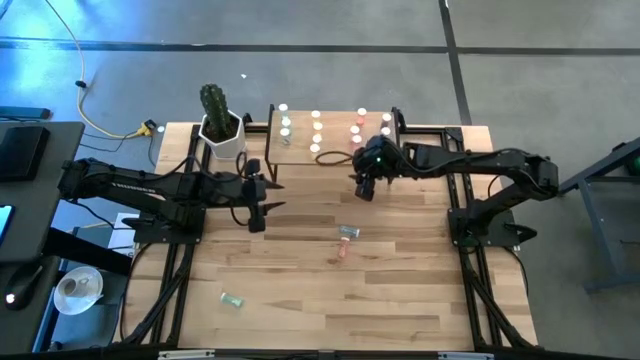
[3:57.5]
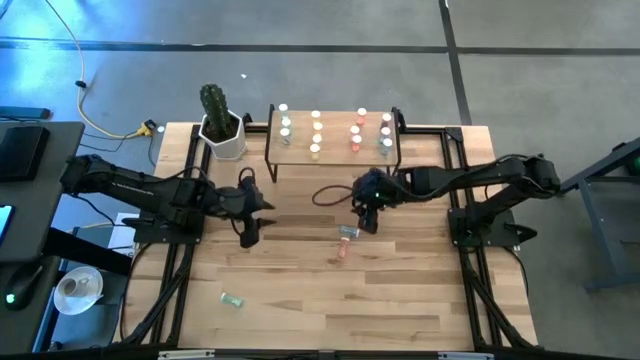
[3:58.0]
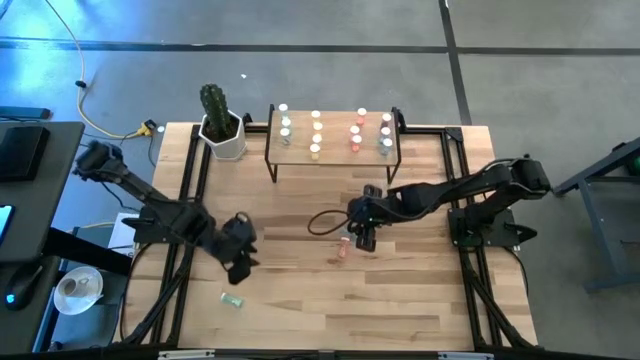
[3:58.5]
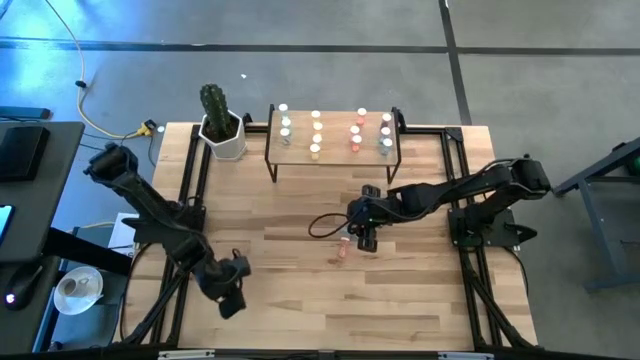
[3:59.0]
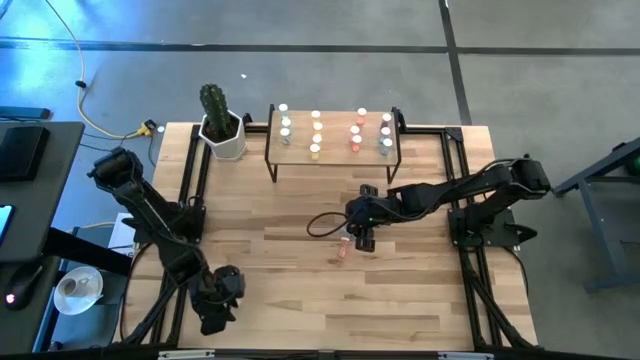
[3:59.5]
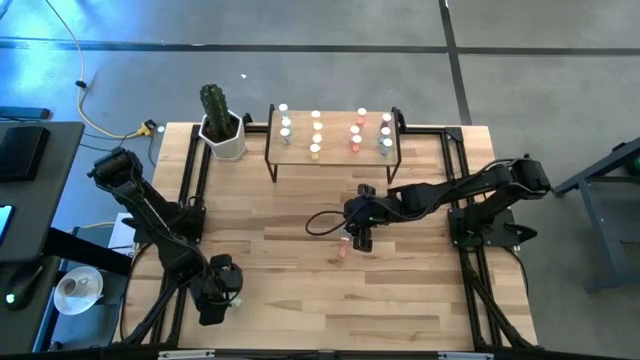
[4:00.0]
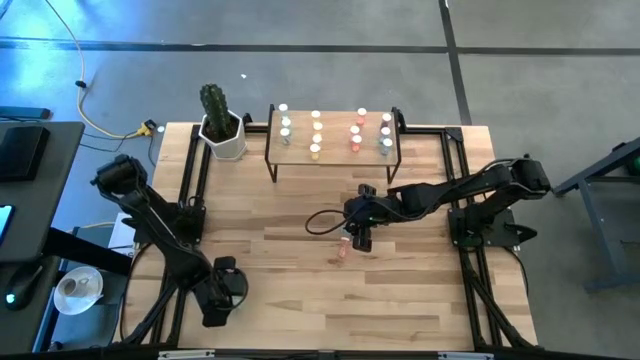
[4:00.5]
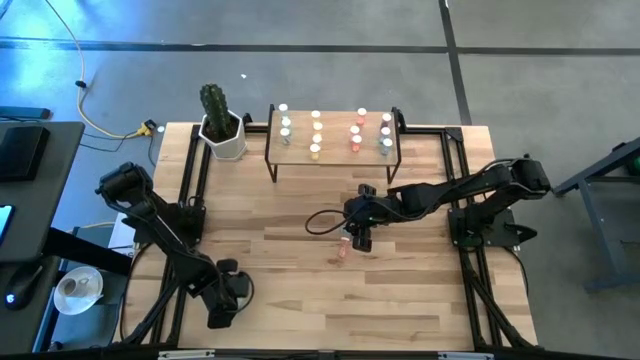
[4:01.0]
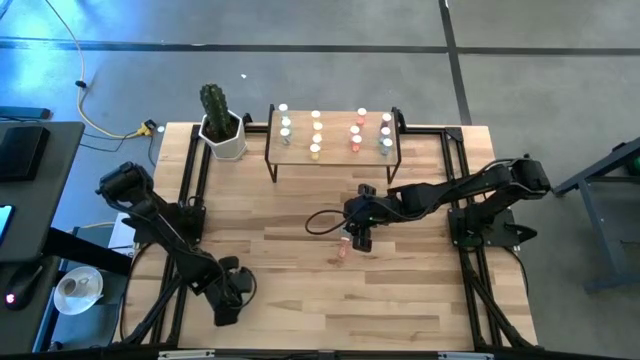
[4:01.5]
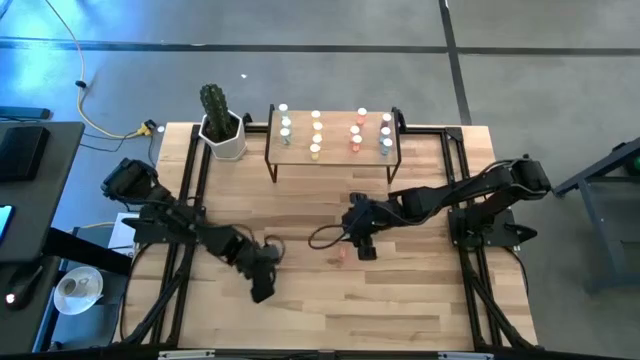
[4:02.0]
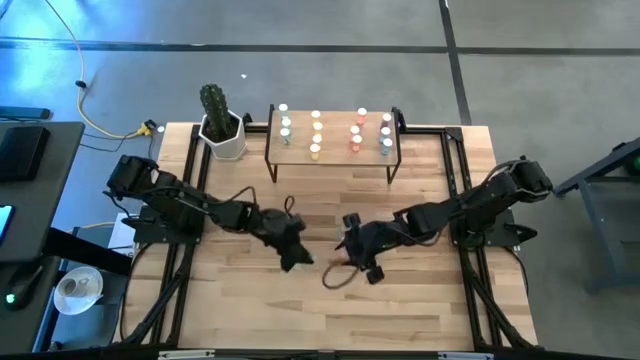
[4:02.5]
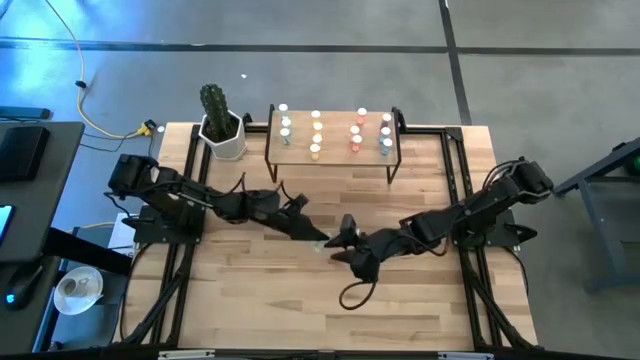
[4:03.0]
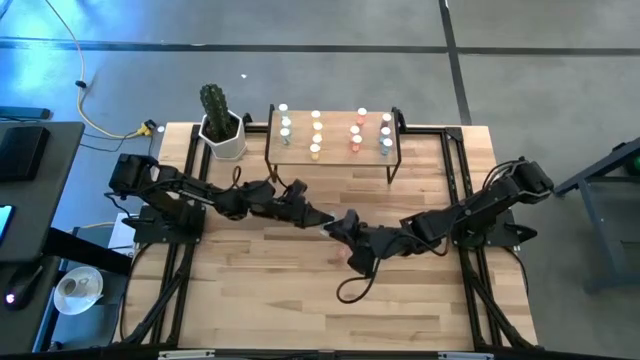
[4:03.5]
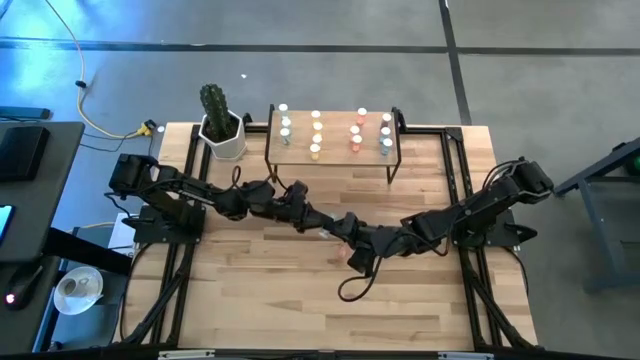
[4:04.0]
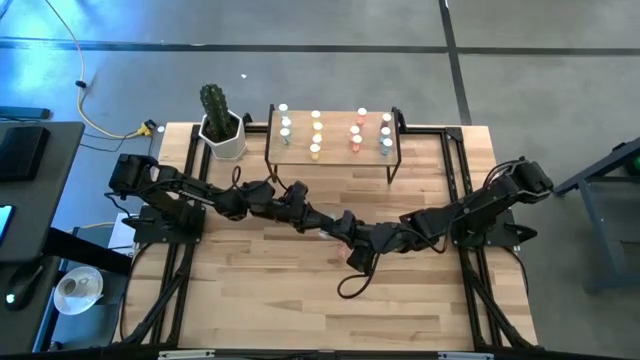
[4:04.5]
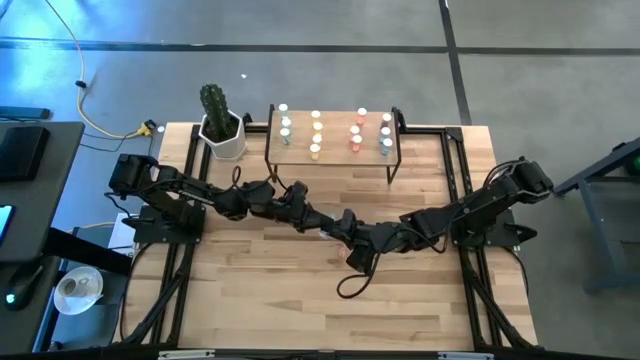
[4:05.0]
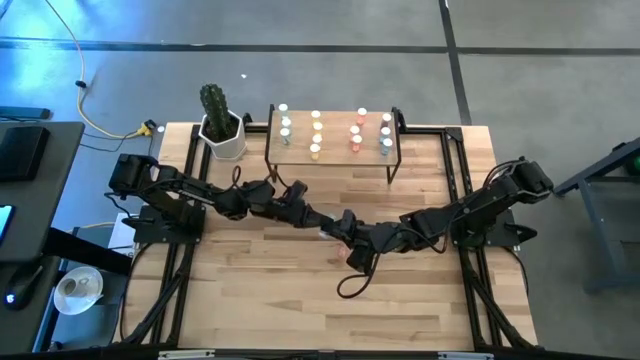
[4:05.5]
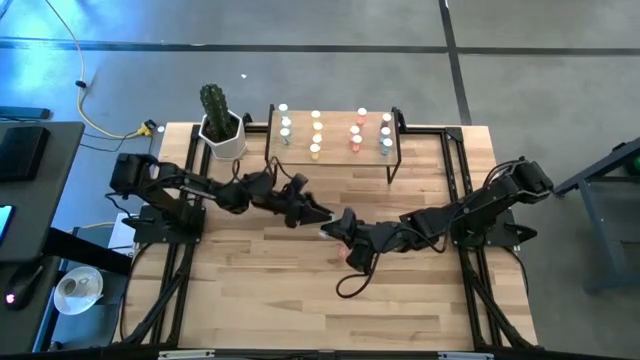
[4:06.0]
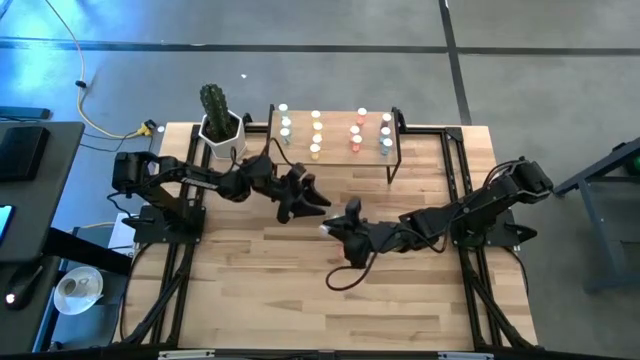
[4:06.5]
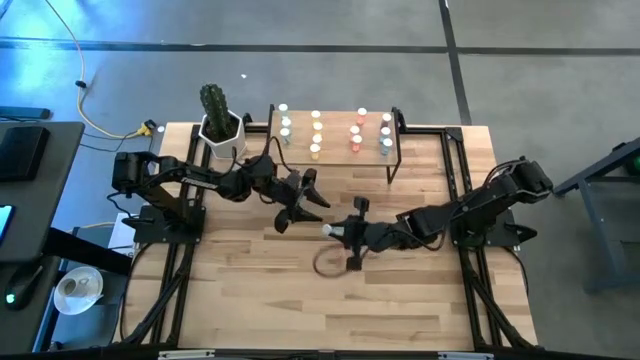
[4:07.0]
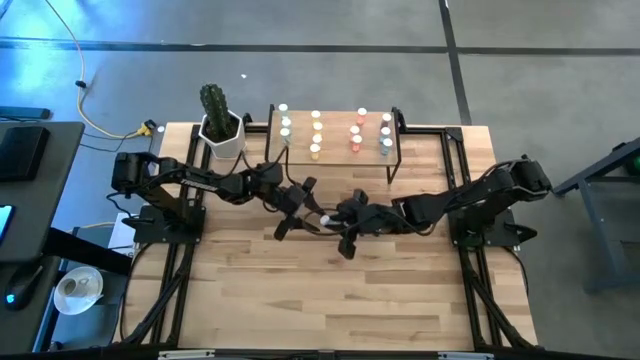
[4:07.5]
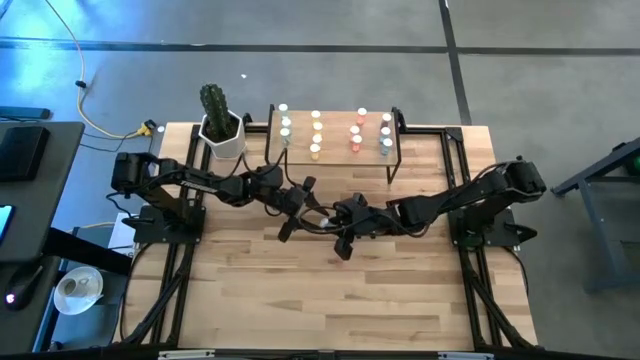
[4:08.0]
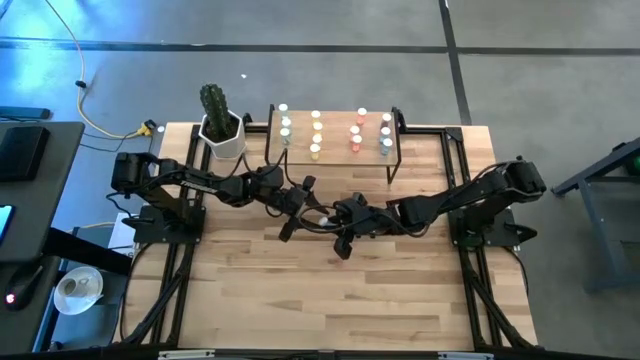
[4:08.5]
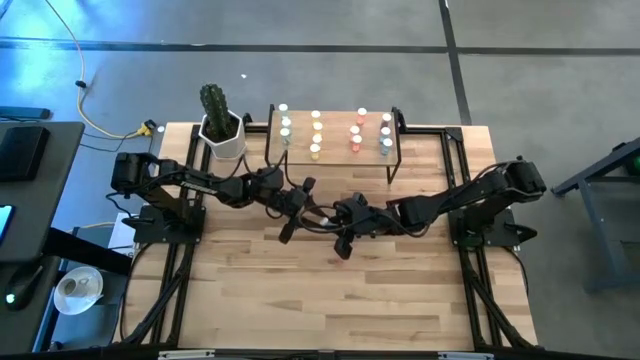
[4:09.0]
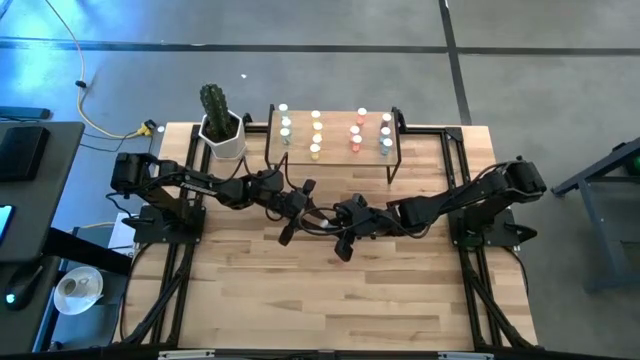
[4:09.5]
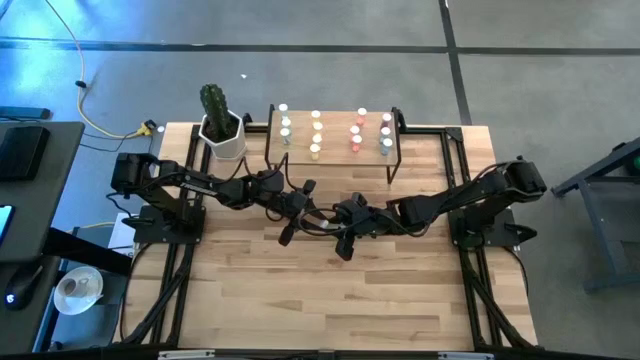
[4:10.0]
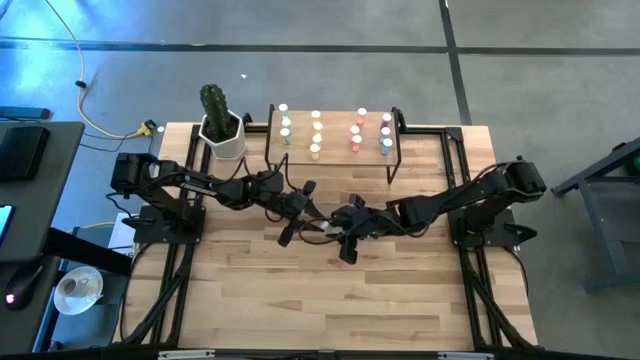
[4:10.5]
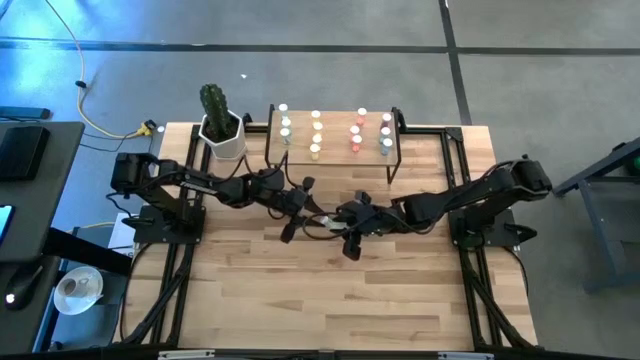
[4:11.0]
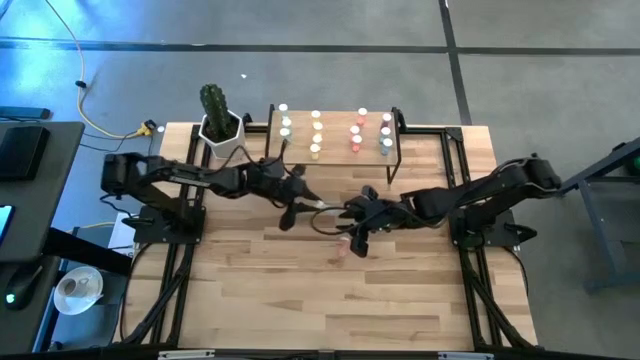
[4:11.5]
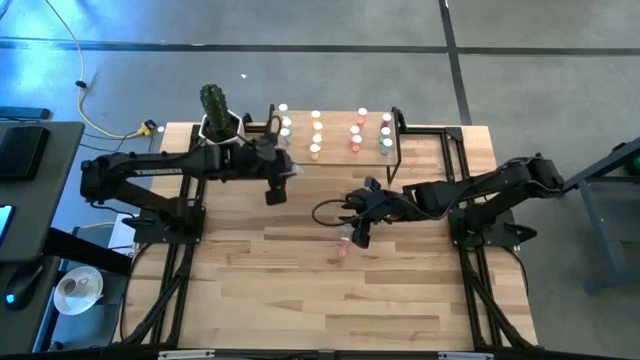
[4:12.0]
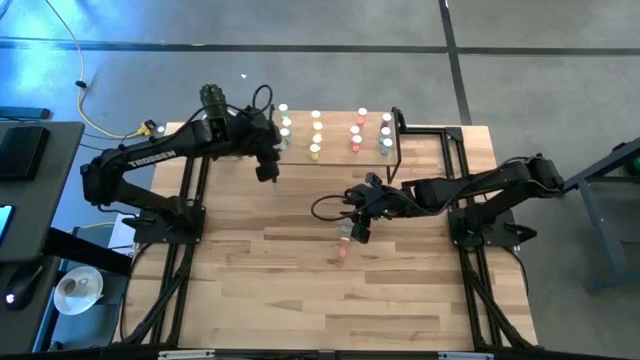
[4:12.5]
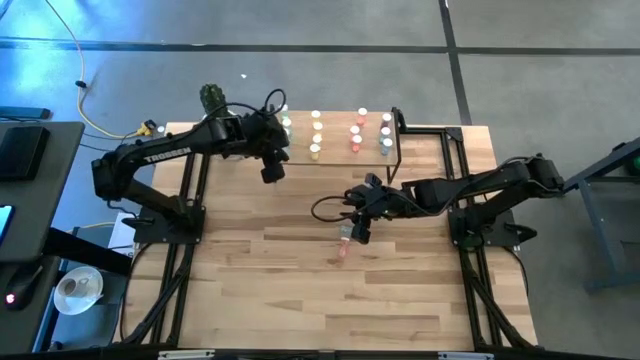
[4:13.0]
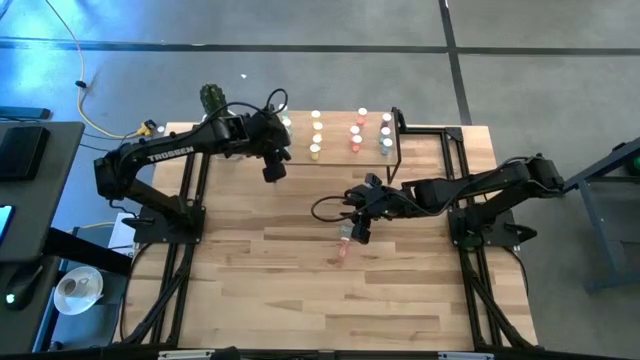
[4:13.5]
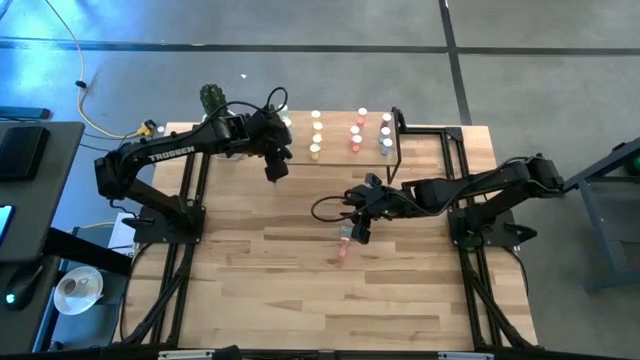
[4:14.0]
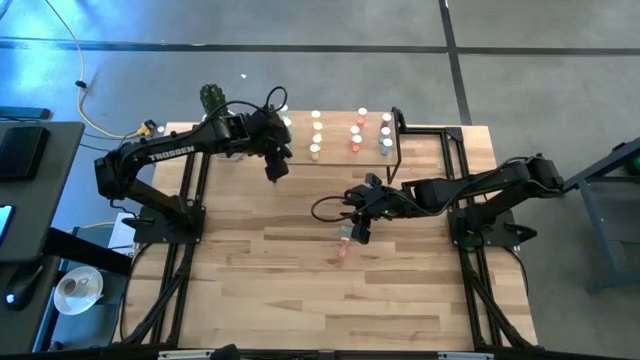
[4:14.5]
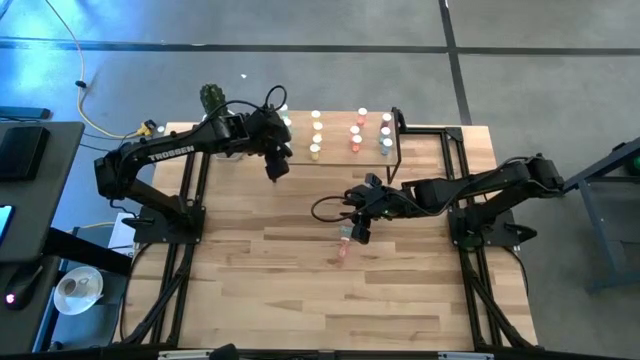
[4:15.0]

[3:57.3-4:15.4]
Task: Pick and place medicine bottles onto shelf by color
Put the light blue pill bottle on the shelf aligned with the other light blue pill bottle

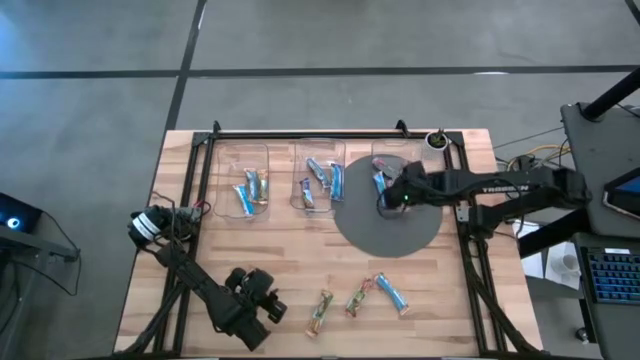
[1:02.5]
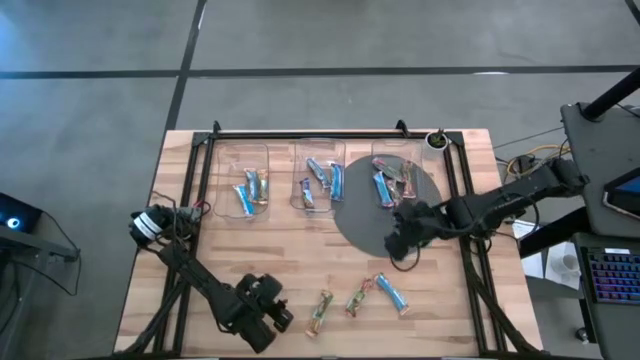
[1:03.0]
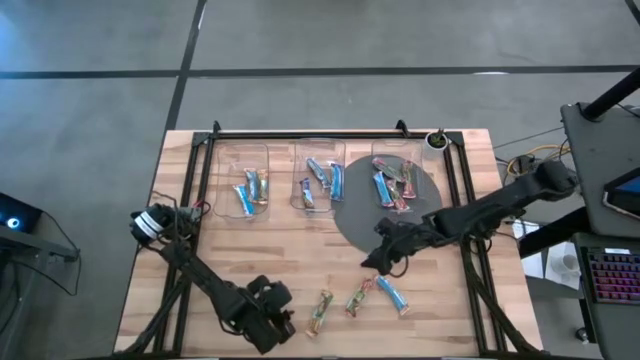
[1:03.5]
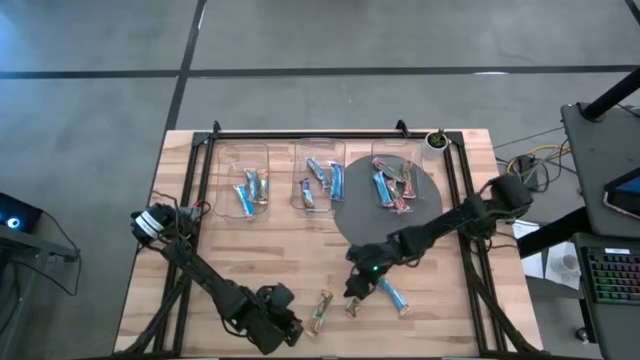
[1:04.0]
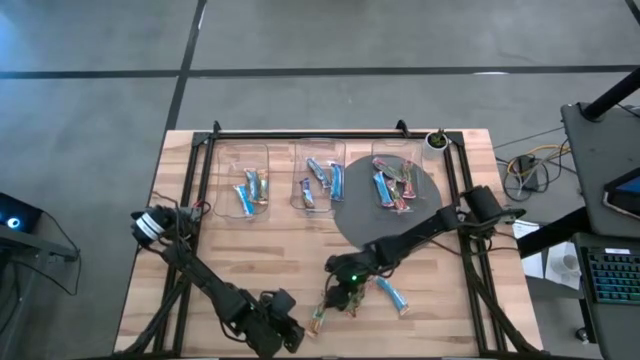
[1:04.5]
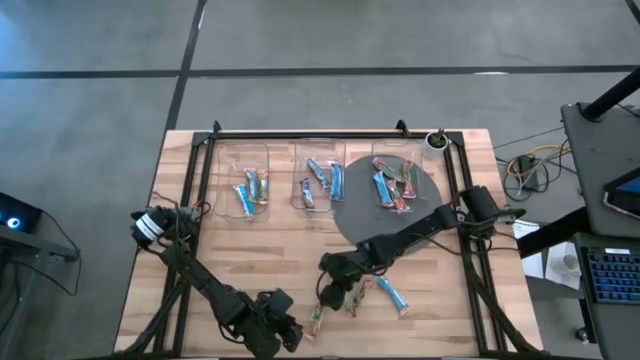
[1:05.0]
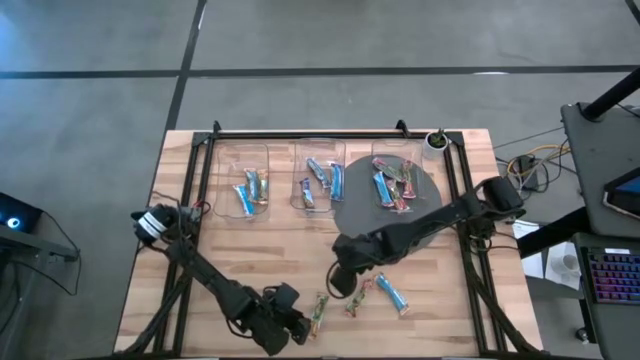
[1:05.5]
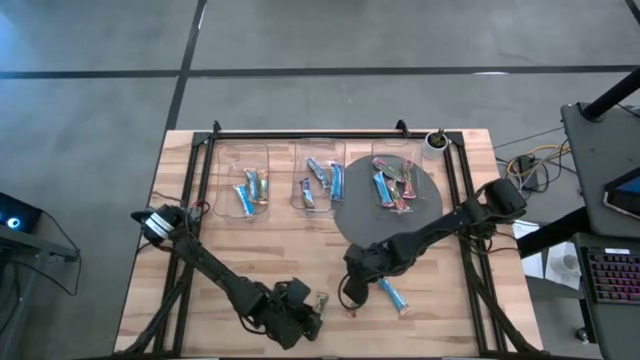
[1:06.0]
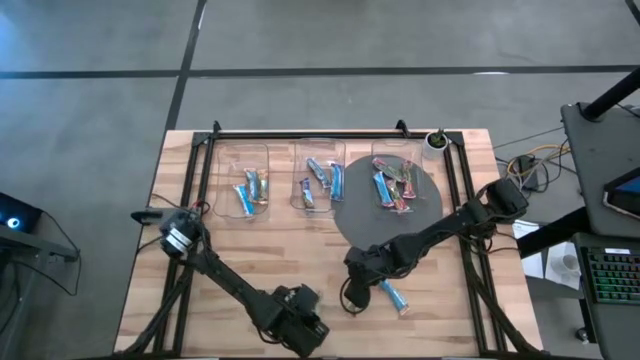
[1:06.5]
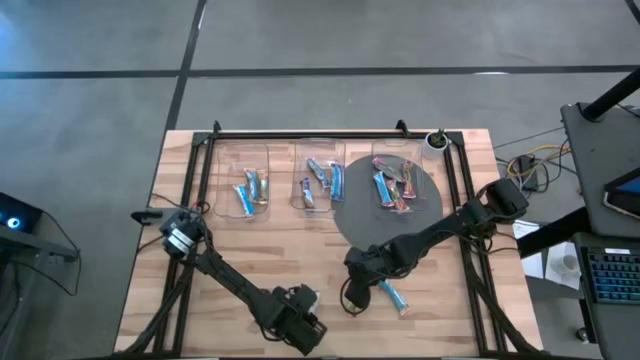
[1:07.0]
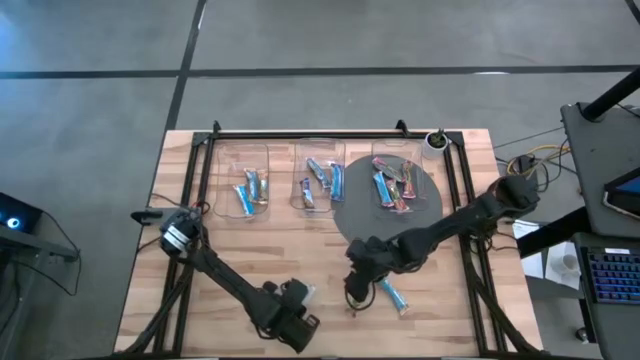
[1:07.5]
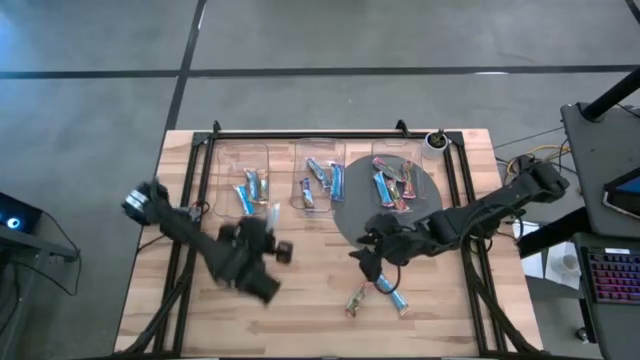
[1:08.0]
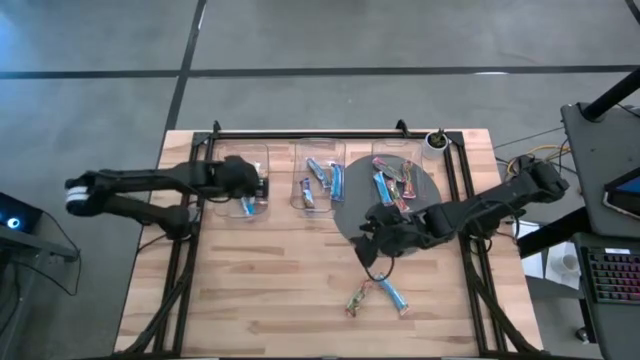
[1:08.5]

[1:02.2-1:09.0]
Task: Pick and place Granola Bars by type
Put the orange granola bar into the left transparent container
